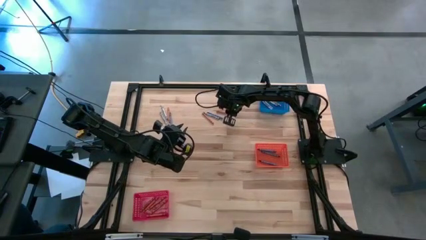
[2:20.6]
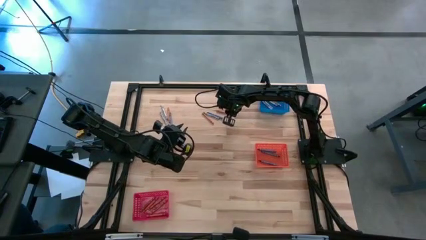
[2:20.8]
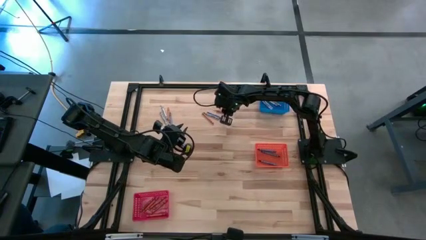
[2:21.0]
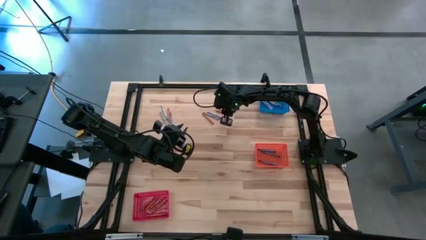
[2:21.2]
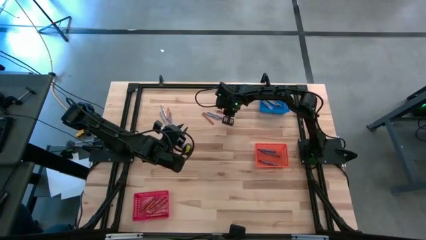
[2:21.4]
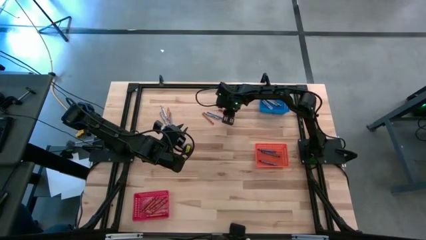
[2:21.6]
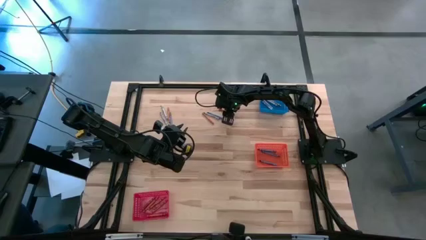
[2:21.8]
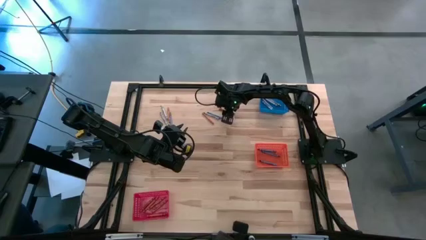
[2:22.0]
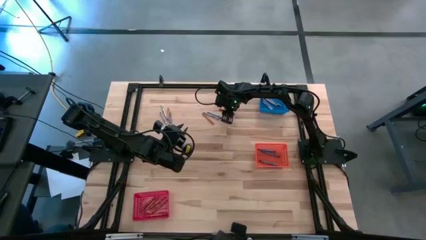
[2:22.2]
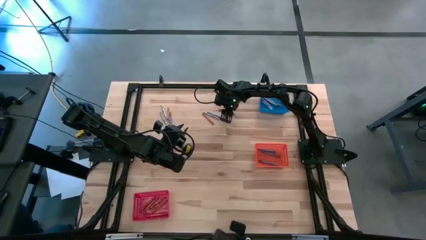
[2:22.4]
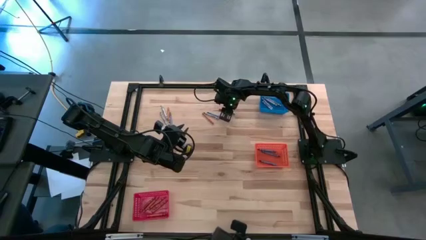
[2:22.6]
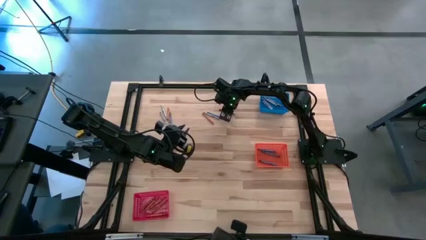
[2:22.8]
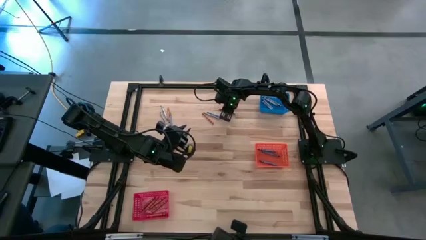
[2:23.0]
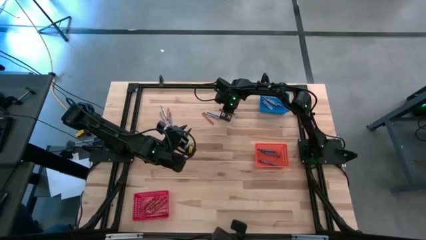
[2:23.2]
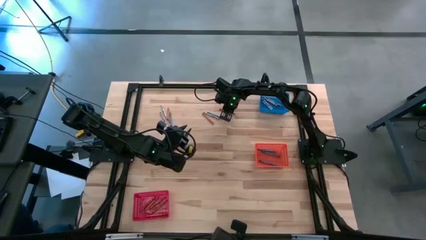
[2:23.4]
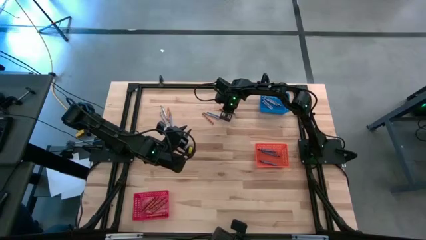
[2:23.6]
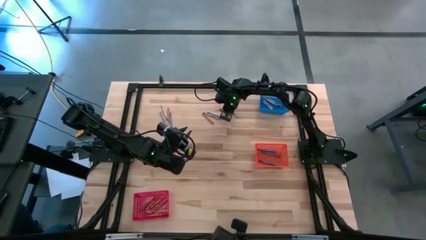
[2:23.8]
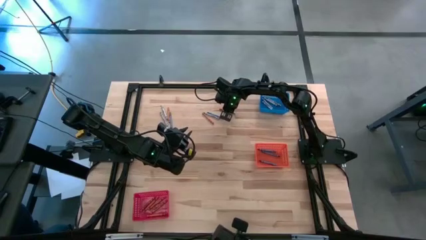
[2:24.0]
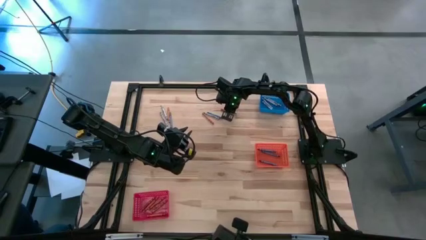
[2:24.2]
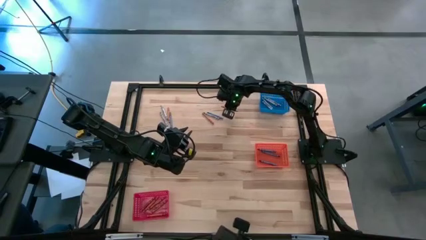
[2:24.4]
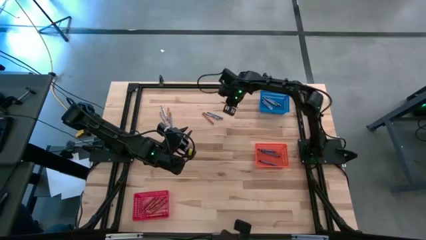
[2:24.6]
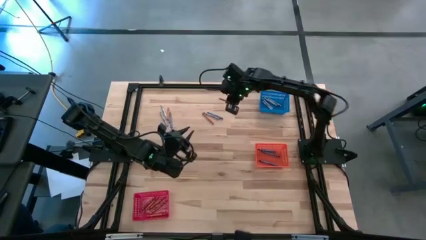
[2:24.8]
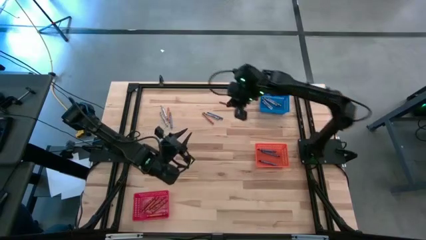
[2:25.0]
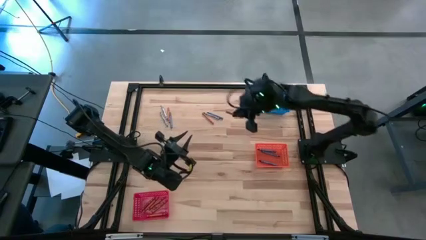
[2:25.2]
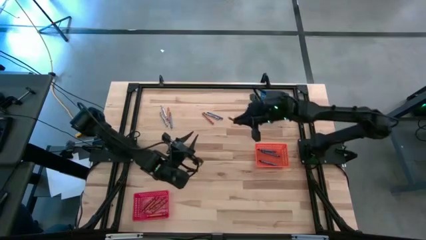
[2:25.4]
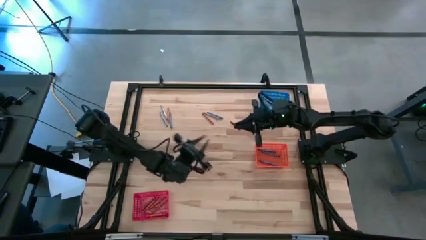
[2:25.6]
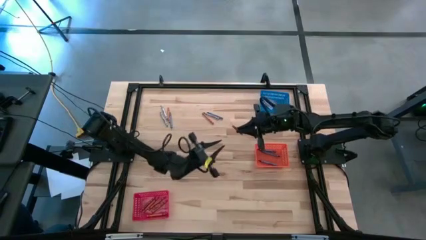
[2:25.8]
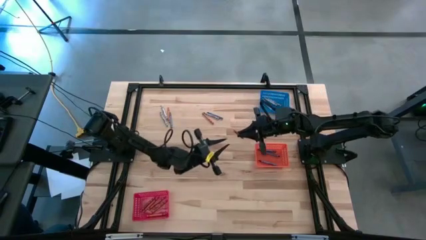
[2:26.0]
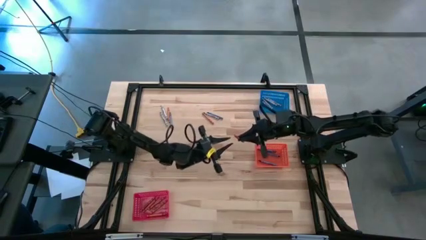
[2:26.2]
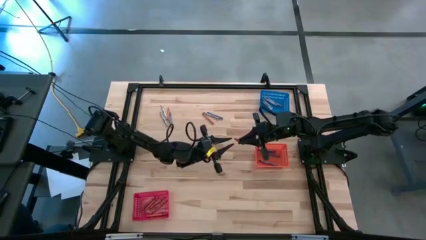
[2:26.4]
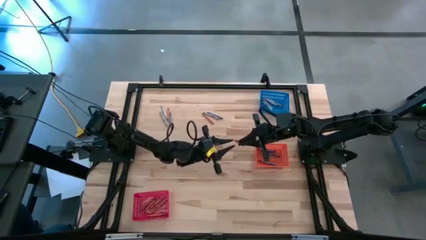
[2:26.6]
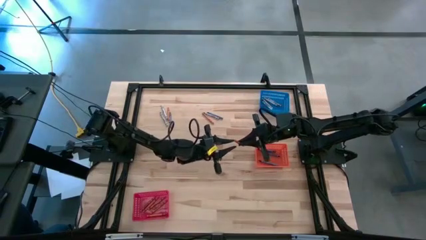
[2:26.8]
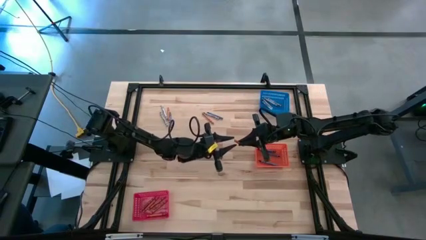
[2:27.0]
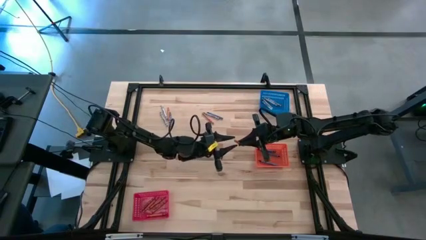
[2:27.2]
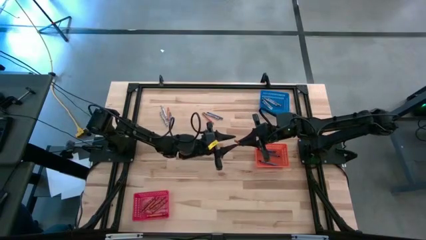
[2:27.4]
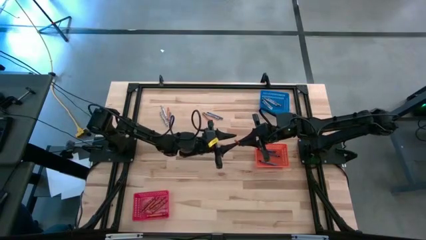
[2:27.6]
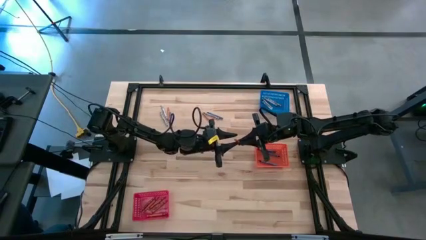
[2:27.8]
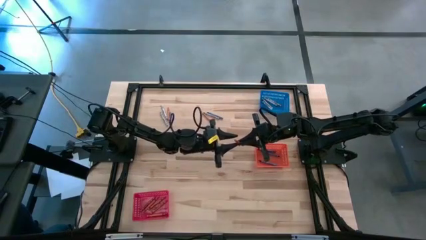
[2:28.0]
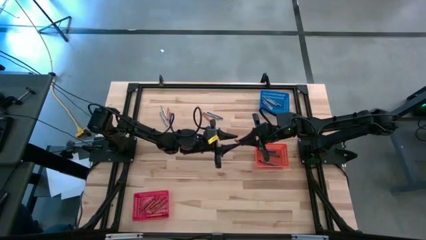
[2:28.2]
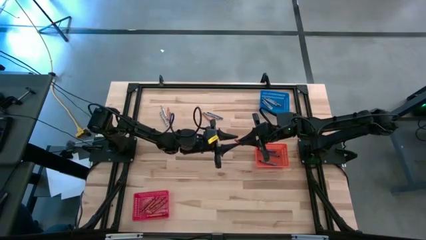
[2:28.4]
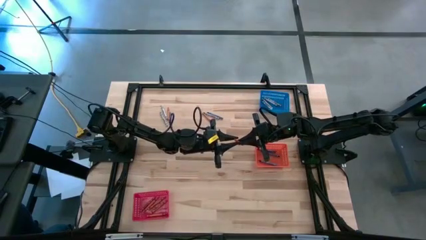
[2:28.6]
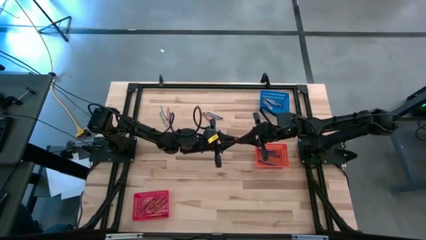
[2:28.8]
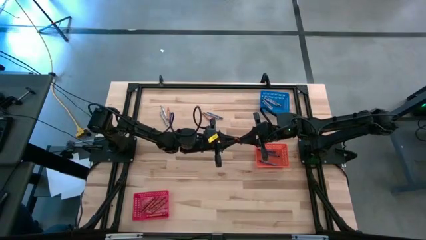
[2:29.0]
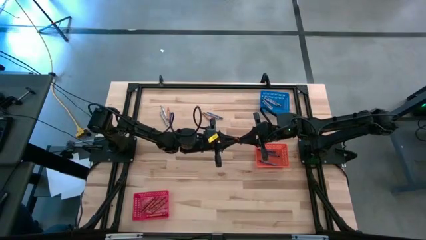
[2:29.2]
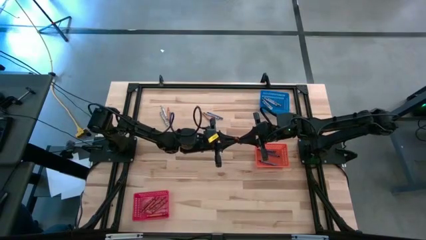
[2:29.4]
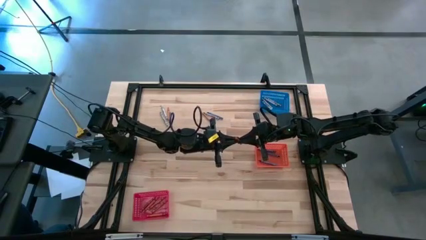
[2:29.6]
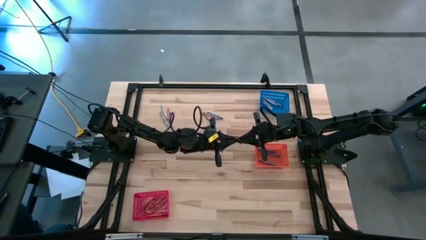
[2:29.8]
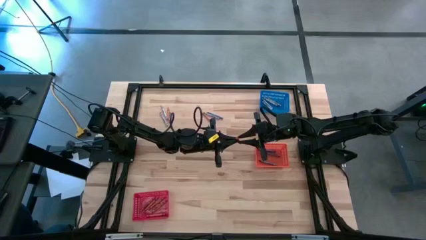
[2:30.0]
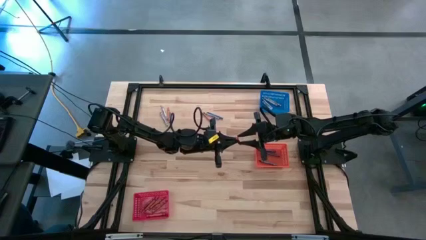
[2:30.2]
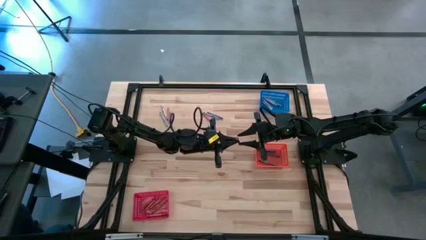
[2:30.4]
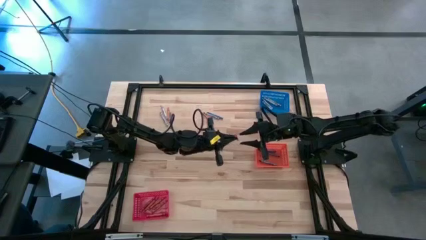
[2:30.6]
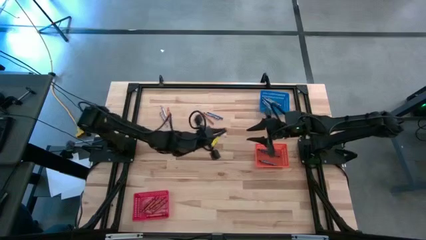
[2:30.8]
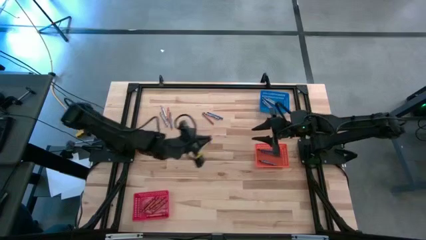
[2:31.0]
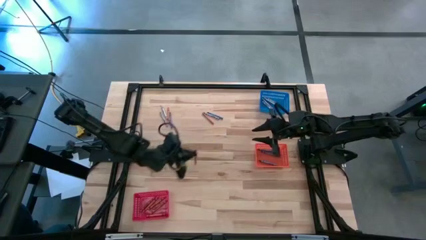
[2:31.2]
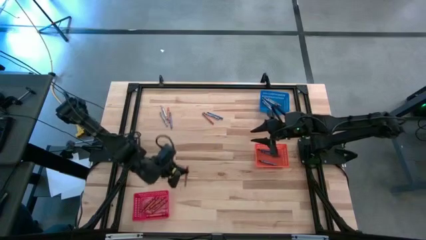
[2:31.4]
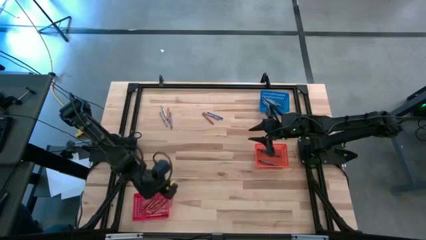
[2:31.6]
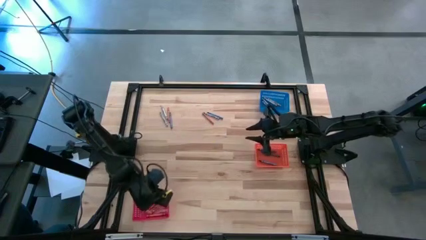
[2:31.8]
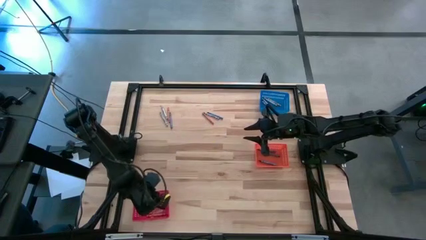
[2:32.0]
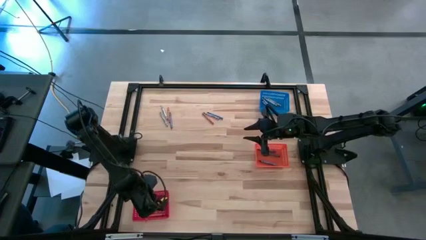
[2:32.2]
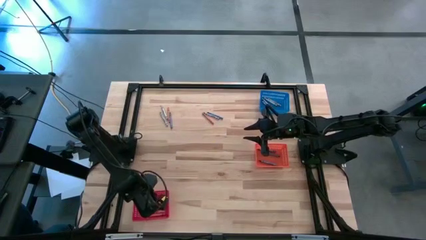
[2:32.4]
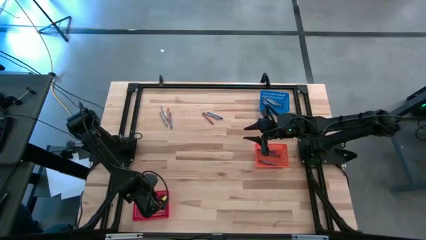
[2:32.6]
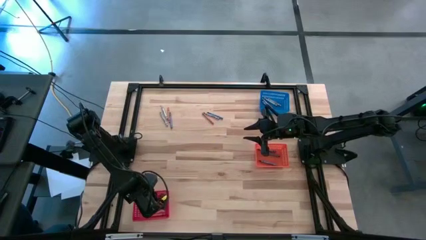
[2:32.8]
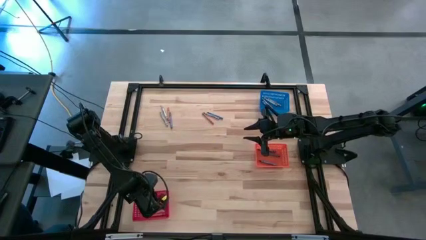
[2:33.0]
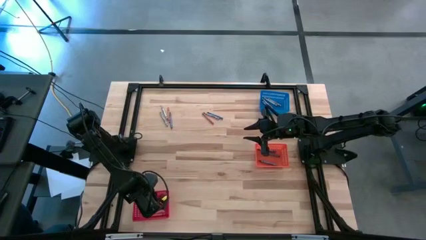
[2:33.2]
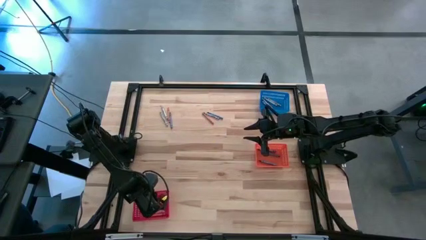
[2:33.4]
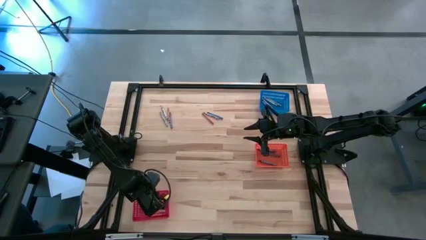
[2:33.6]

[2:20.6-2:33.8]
Task: Sort crayons
Put the orange crayon into the red bin

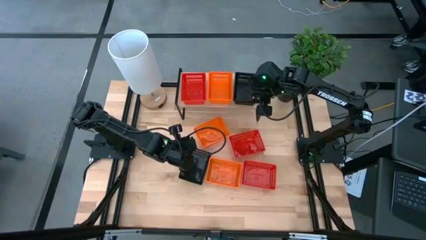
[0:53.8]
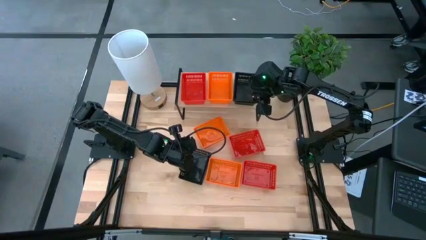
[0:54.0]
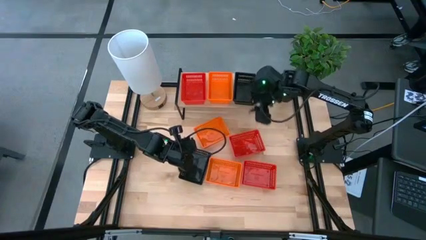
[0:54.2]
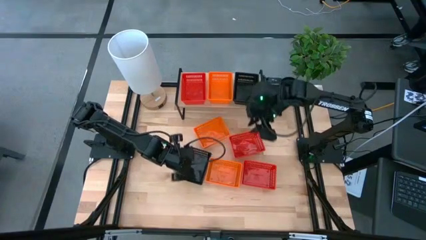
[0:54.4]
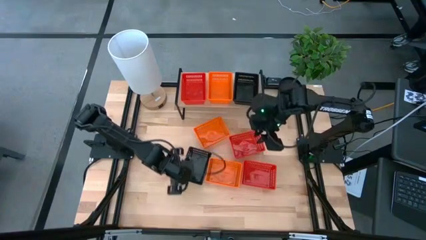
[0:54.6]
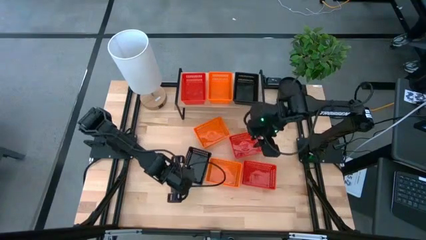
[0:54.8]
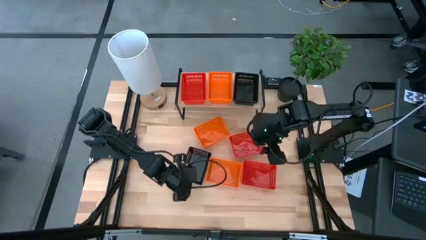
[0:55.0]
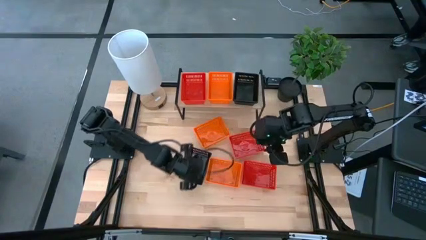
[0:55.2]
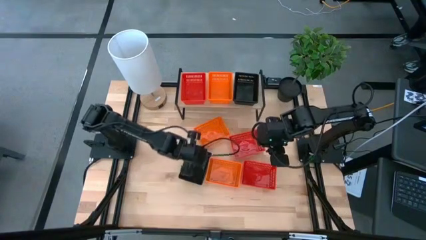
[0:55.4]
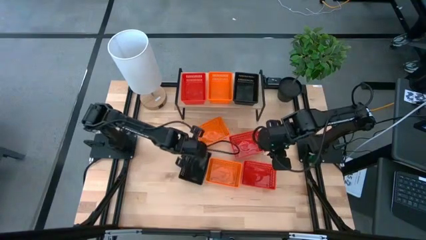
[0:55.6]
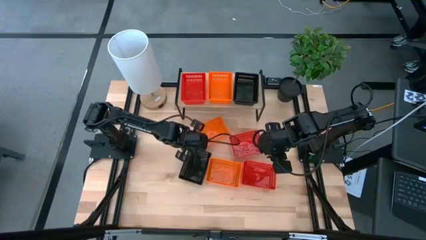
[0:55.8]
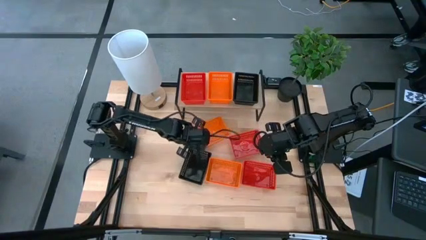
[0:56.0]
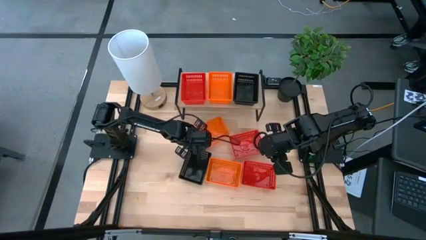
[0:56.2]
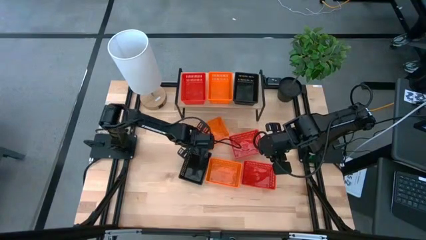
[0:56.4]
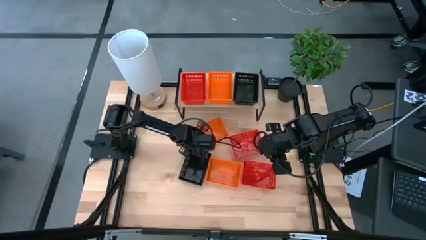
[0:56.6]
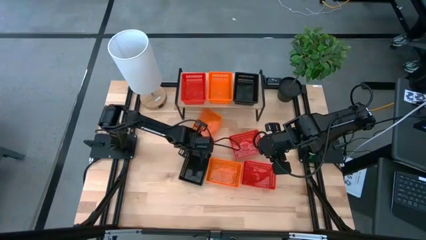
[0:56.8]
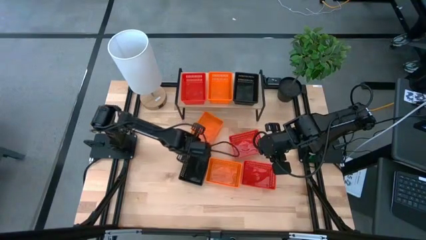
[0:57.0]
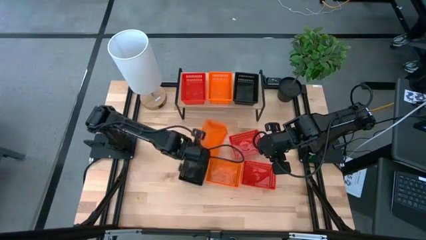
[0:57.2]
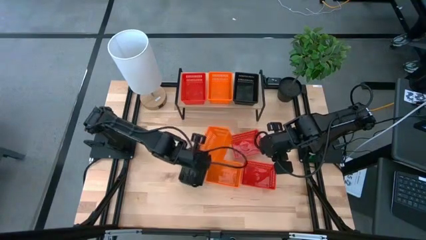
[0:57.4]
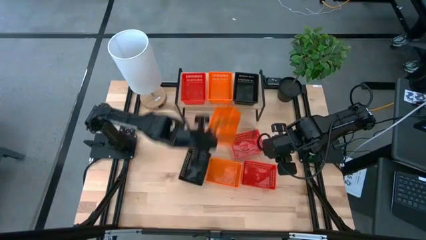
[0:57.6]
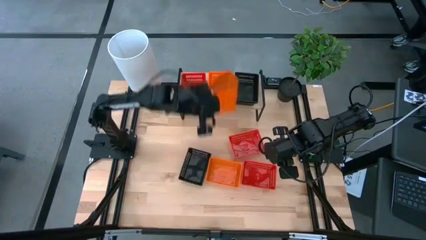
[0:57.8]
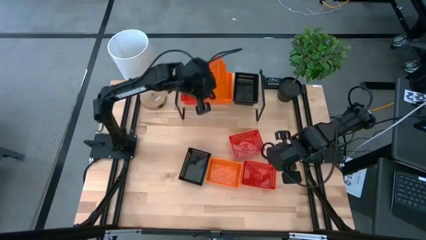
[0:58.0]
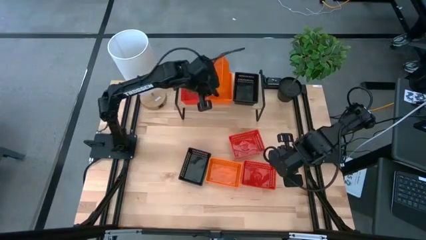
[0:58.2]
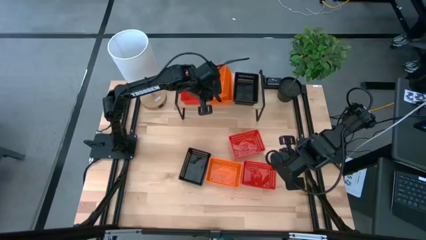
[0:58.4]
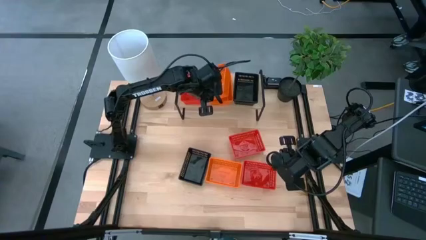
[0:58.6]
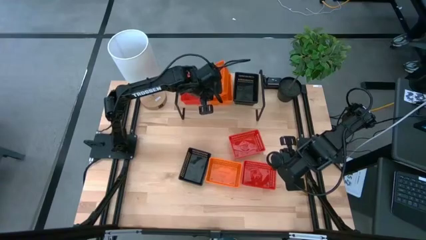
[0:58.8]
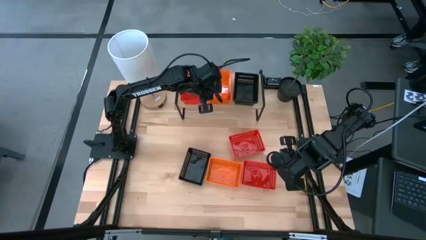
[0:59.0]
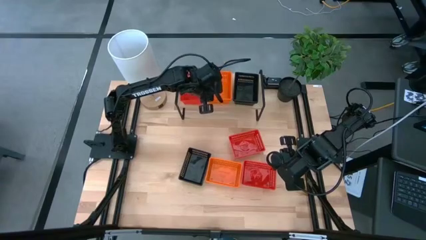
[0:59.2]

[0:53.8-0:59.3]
Task: Stack baskets on shelf by color
Stack the top orange basket on the orange basket on the shelf
